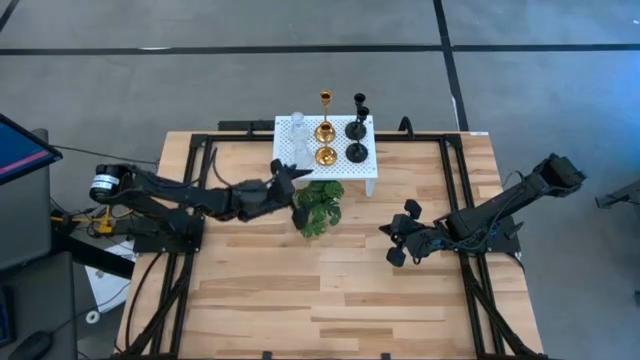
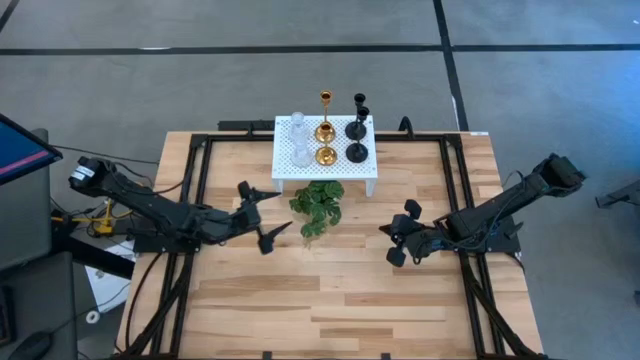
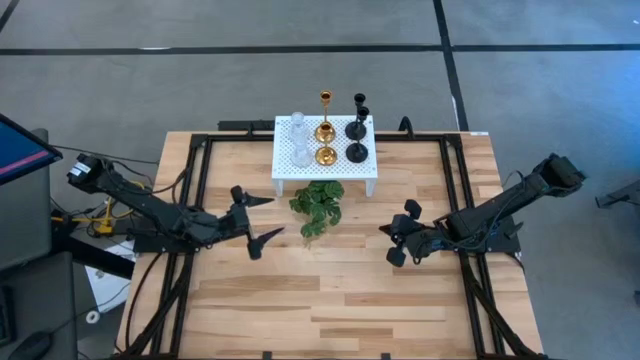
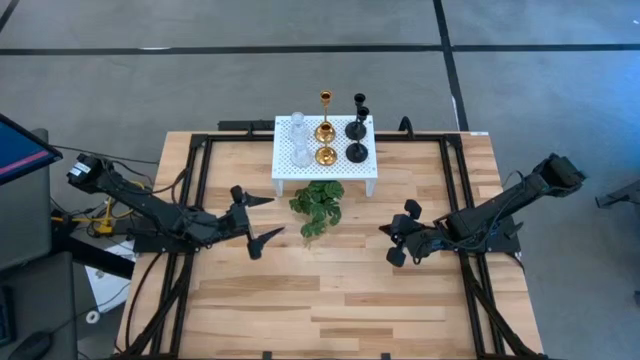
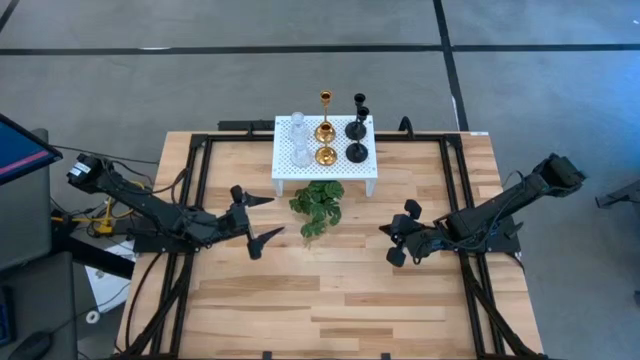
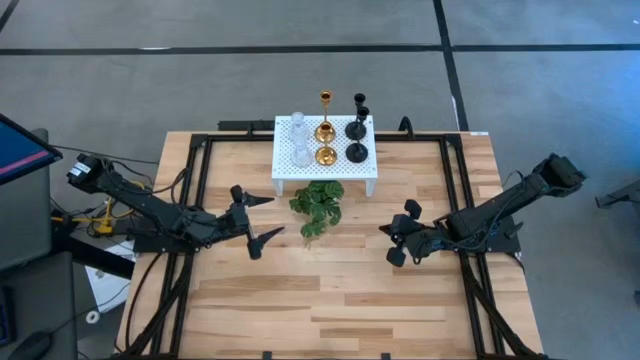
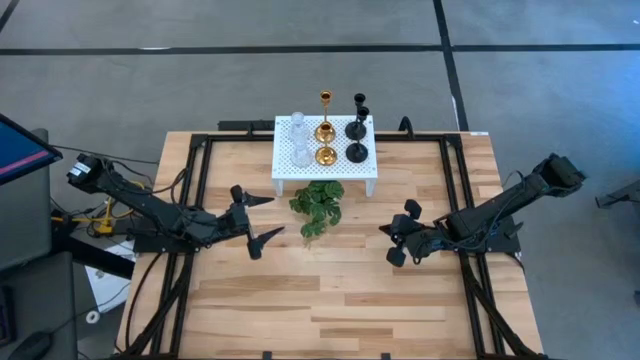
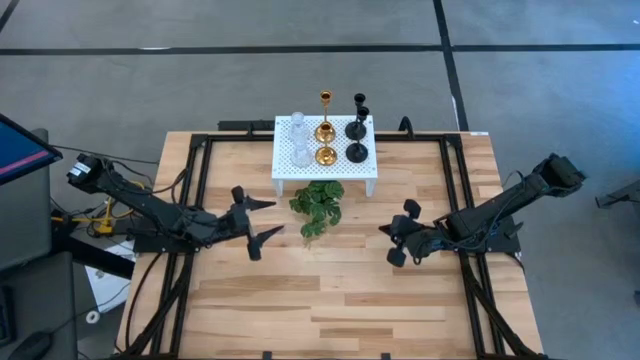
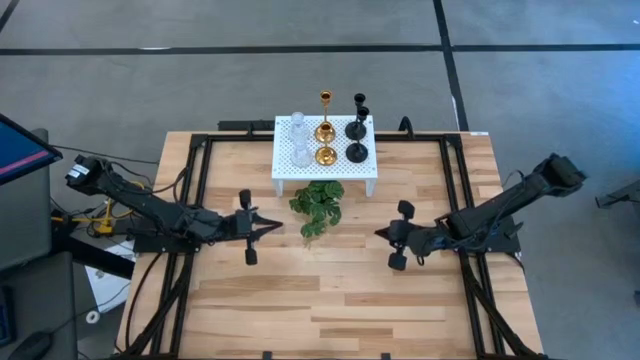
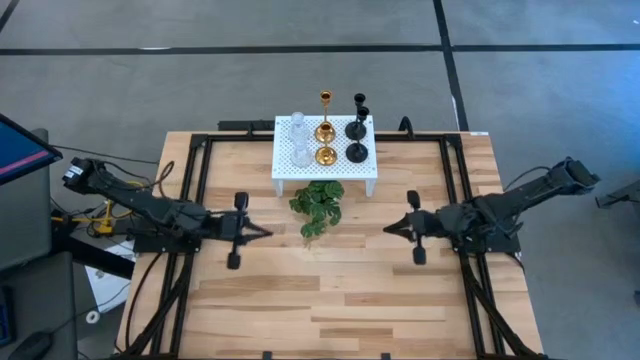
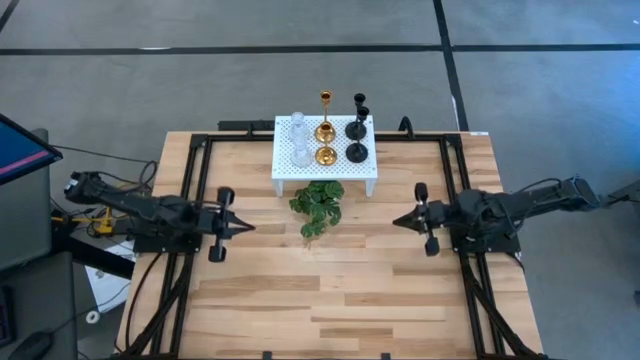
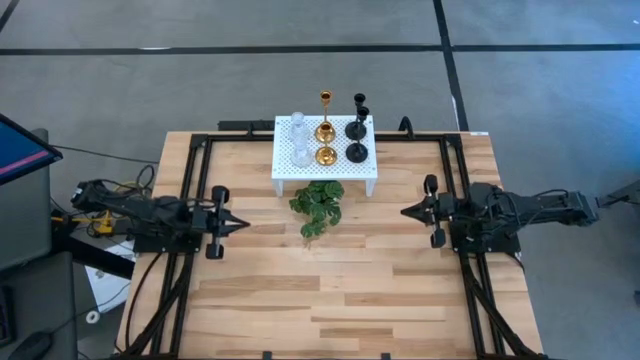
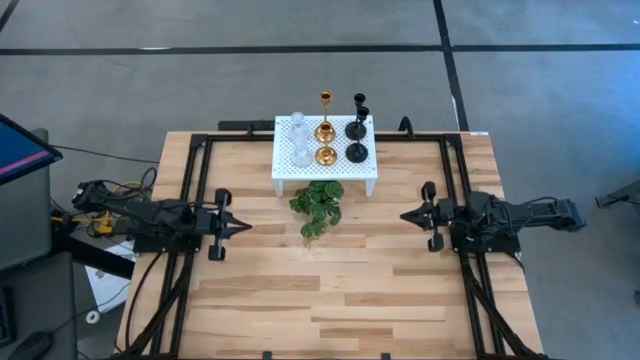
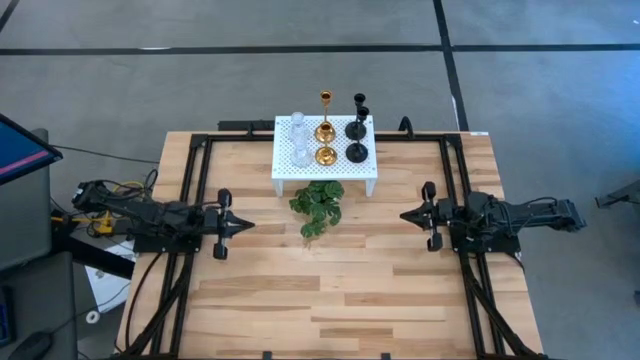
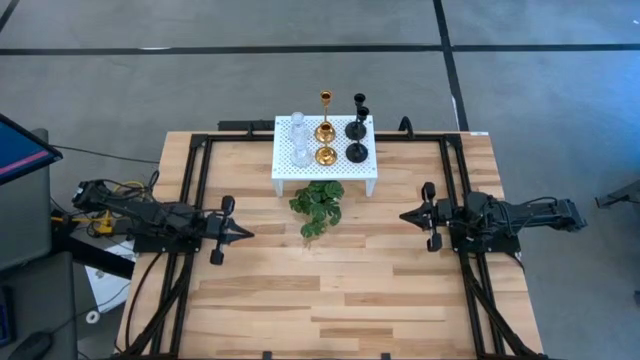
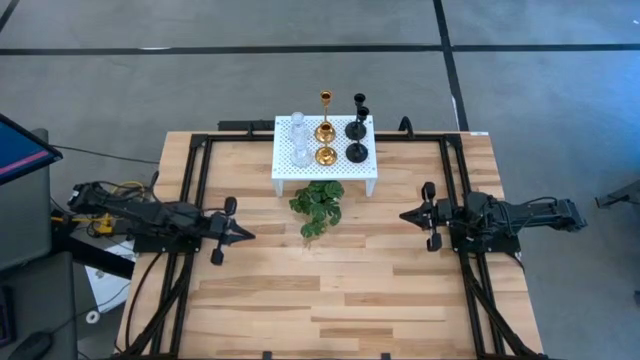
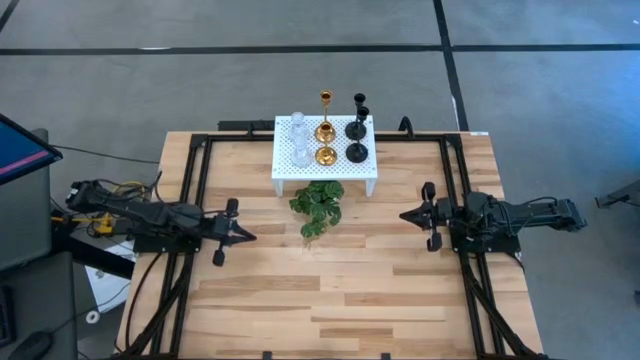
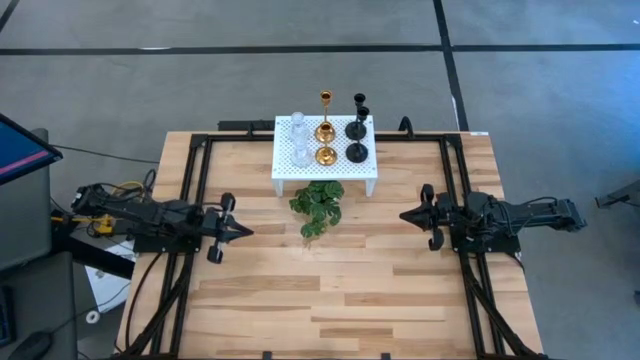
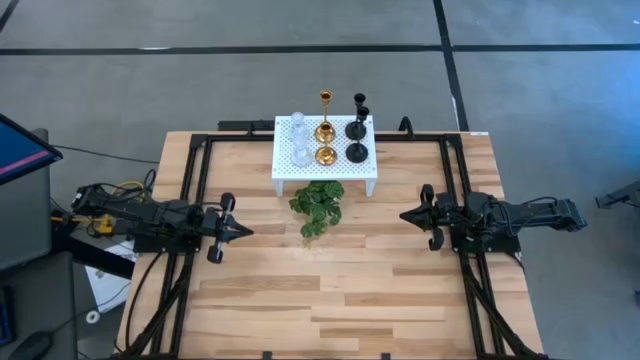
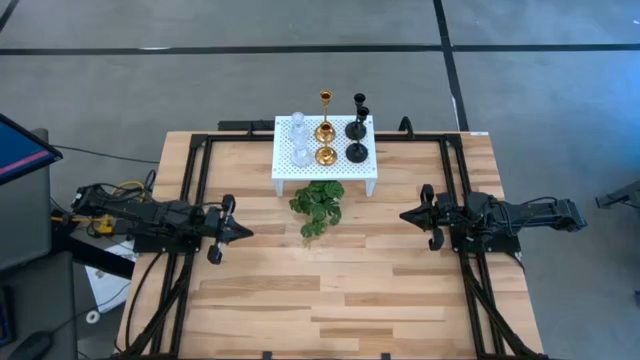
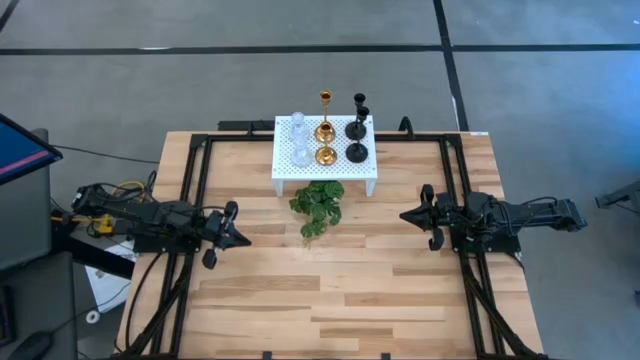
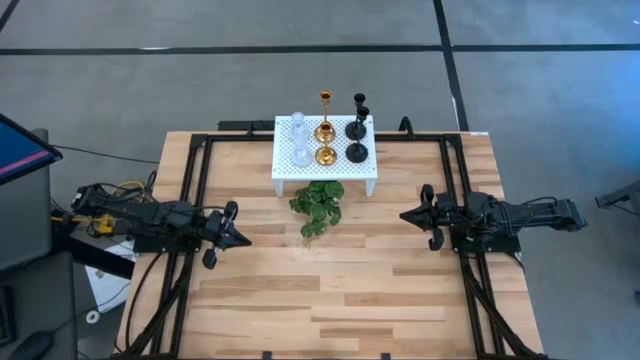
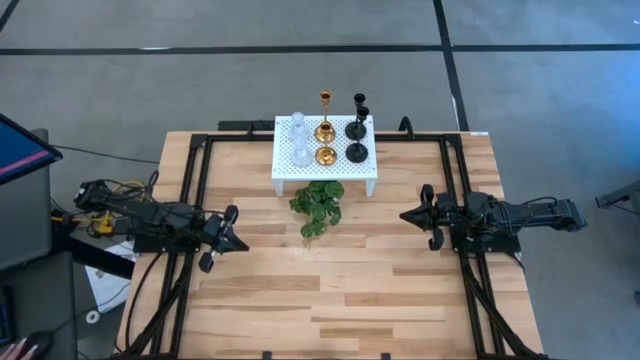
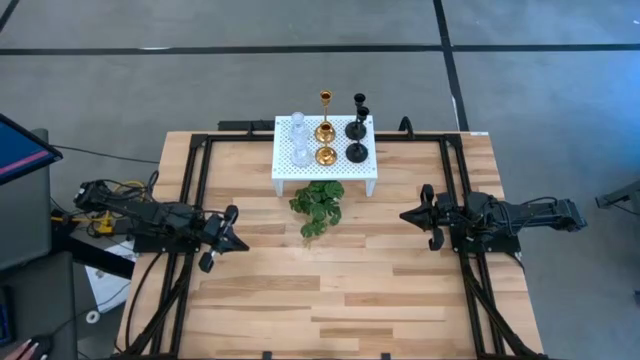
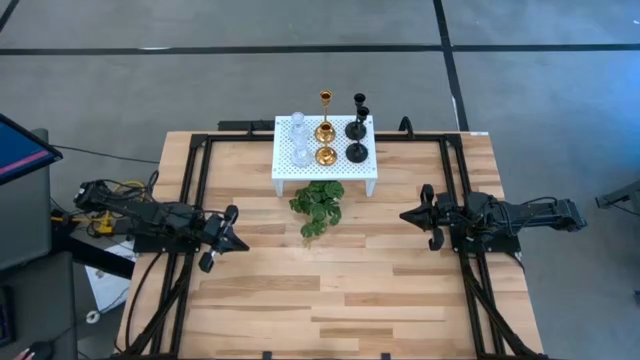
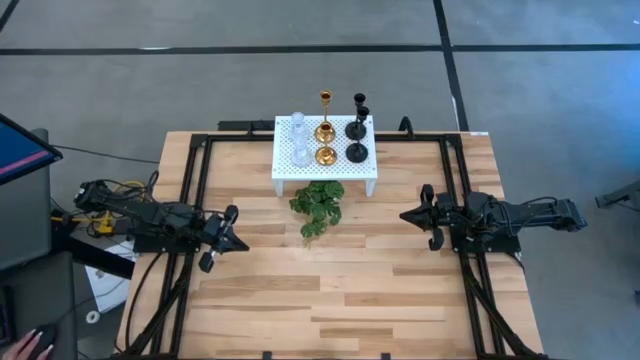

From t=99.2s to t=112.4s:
Task: Pick & Place candle stick holders
Return to Home Position

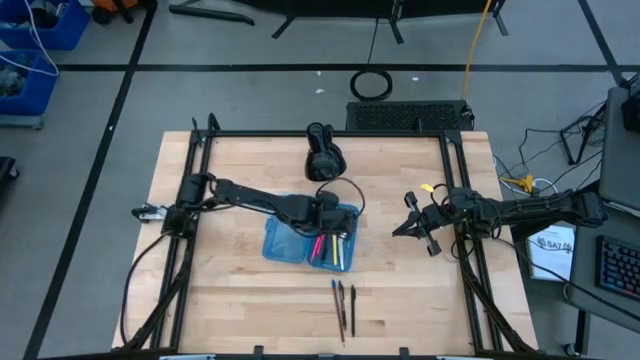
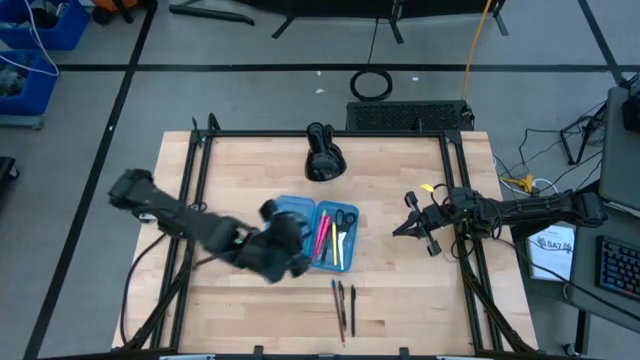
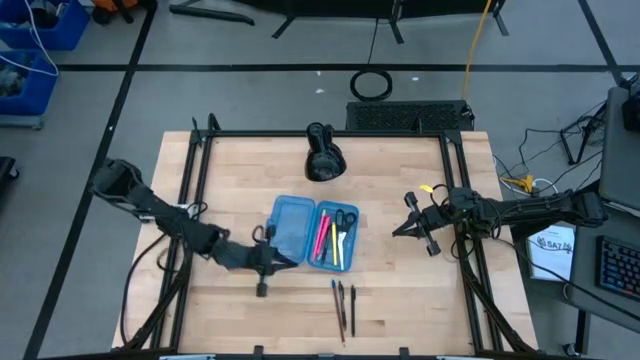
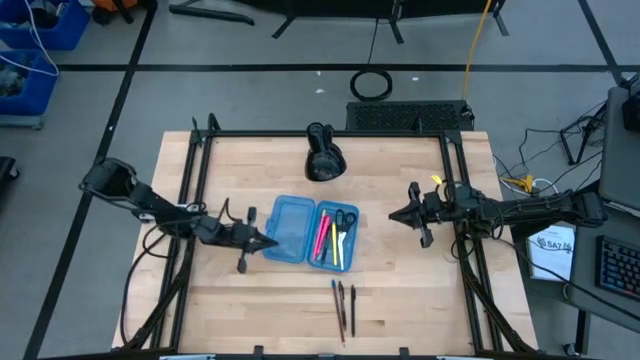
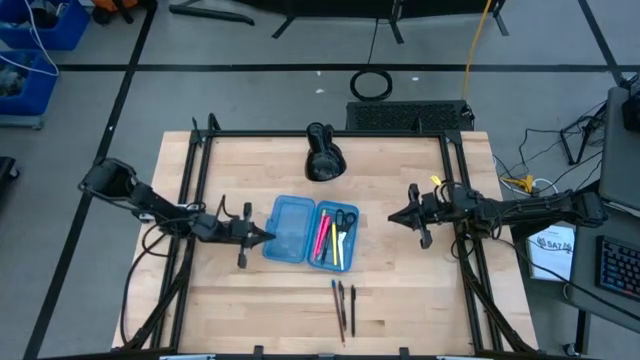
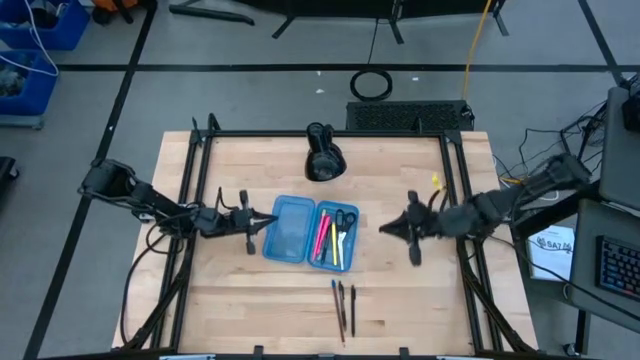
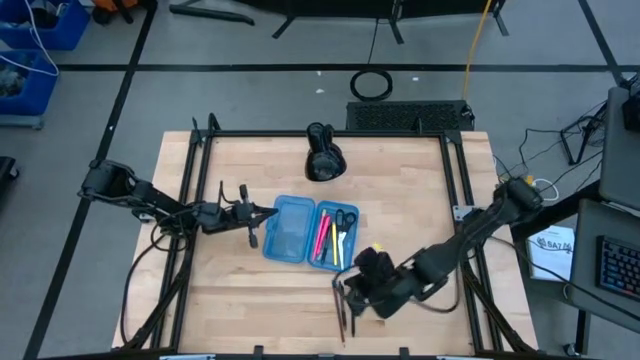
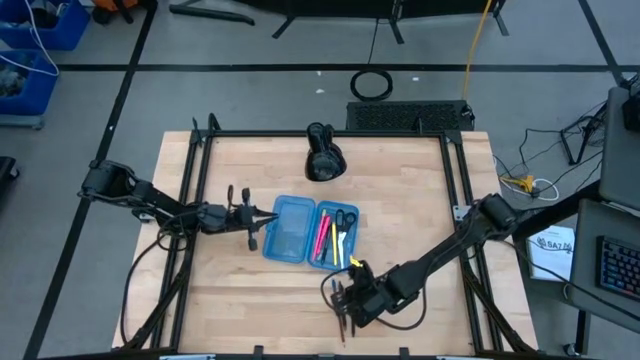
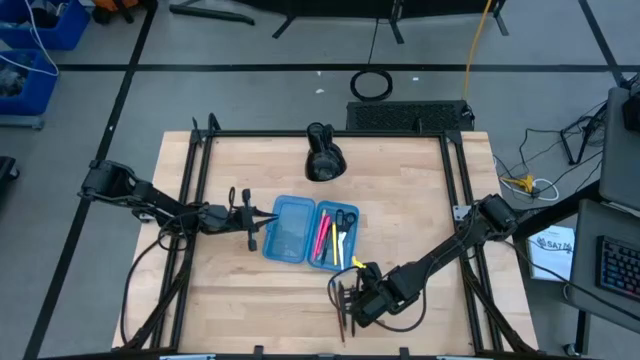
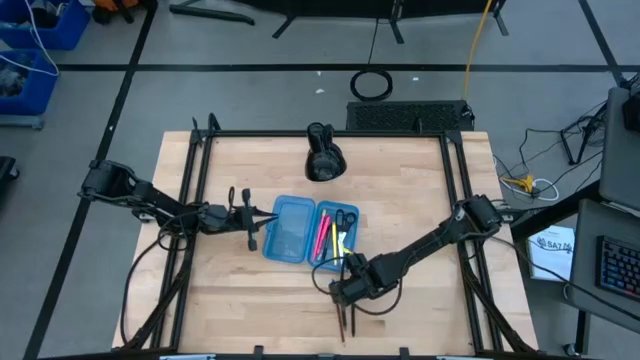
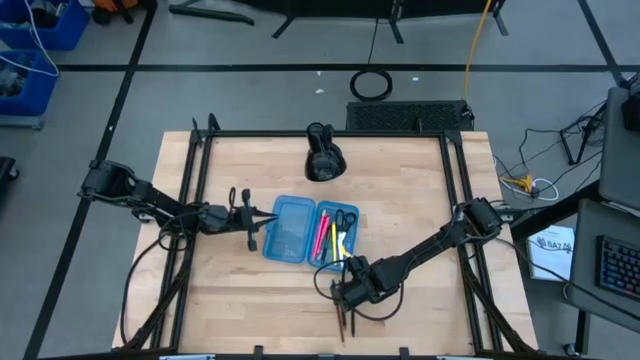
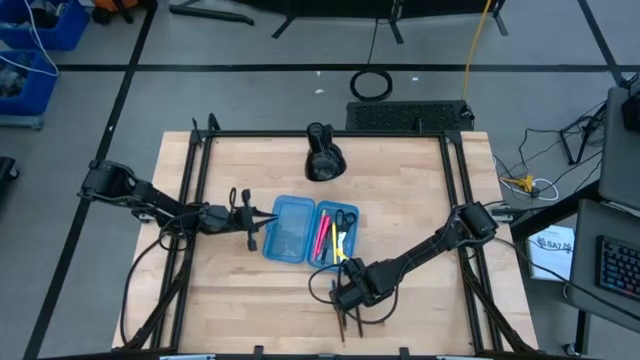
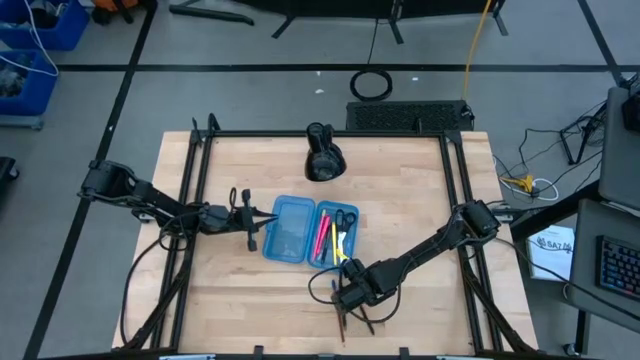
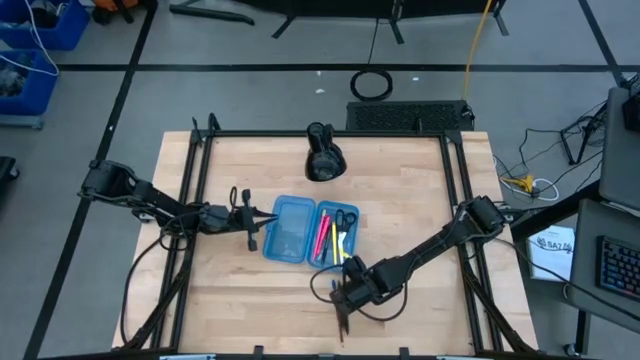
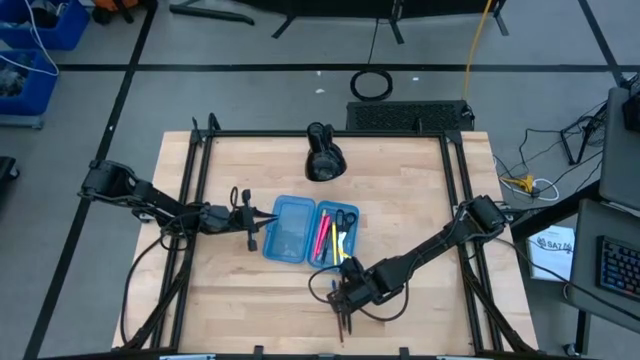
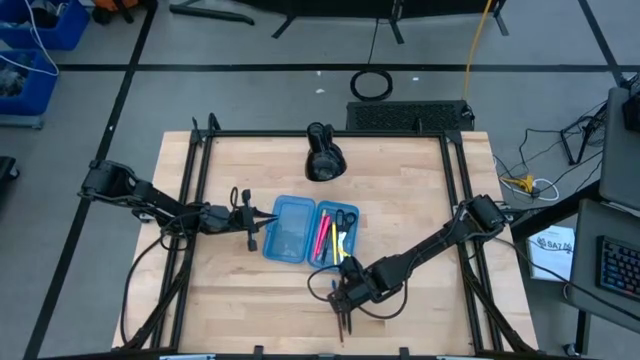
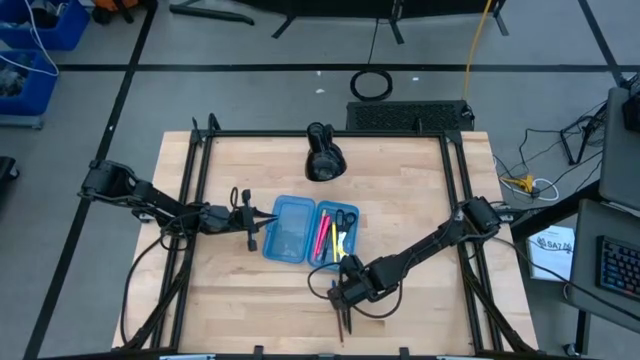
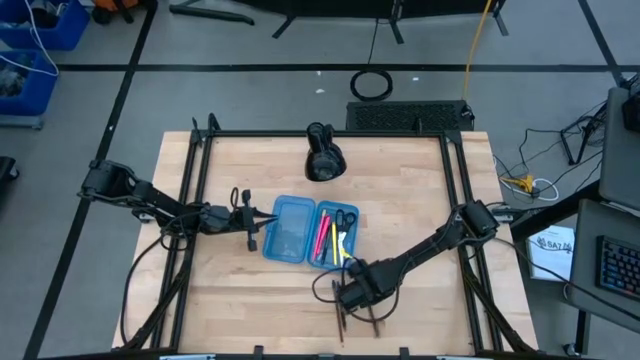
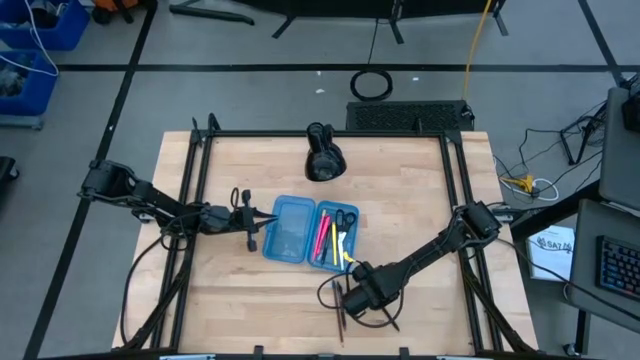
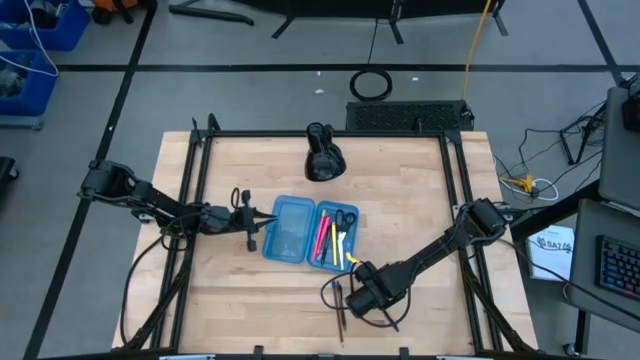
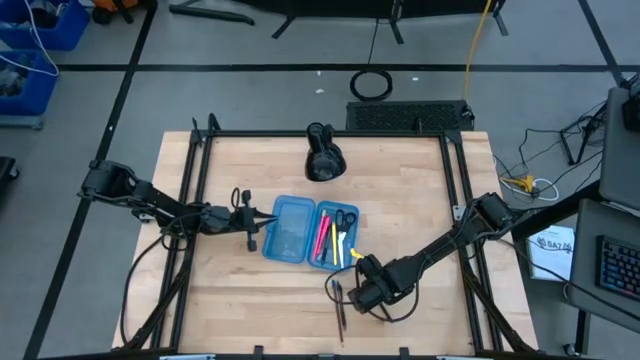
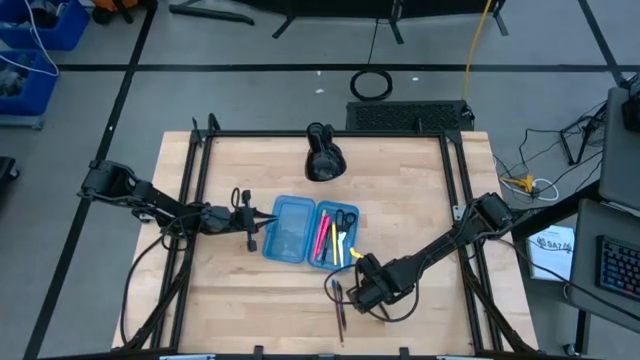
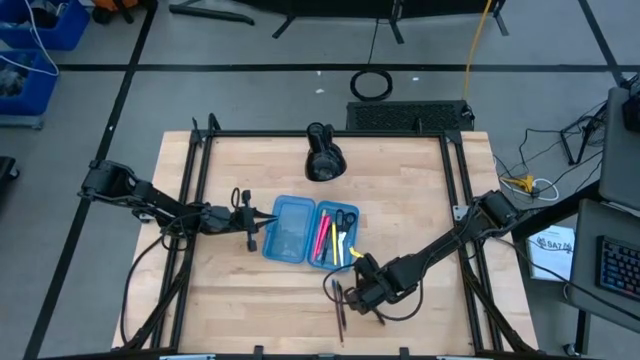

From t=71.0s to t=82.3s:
Task: Pick & place school supplies into a supply box
Put the right black pen into the blue supply box
